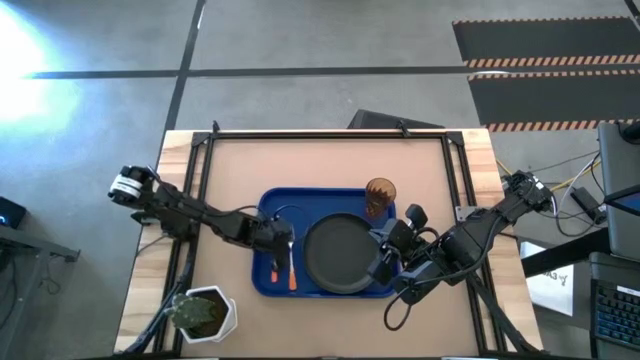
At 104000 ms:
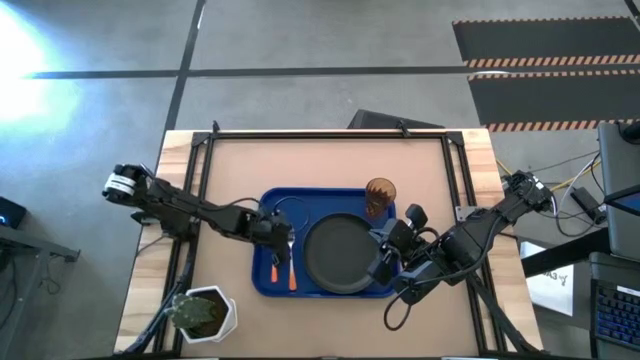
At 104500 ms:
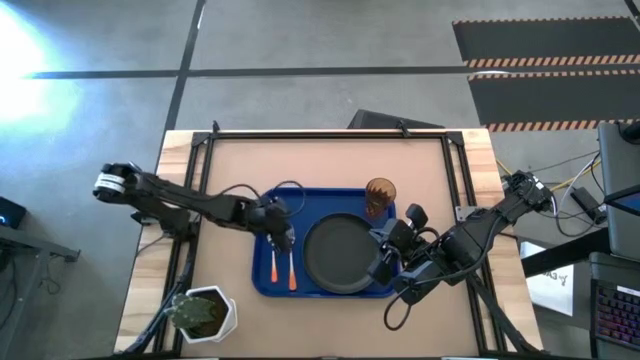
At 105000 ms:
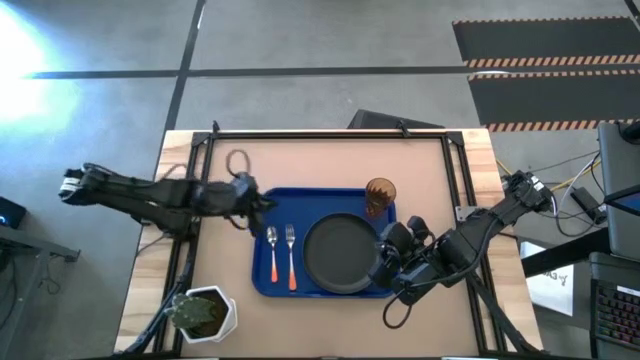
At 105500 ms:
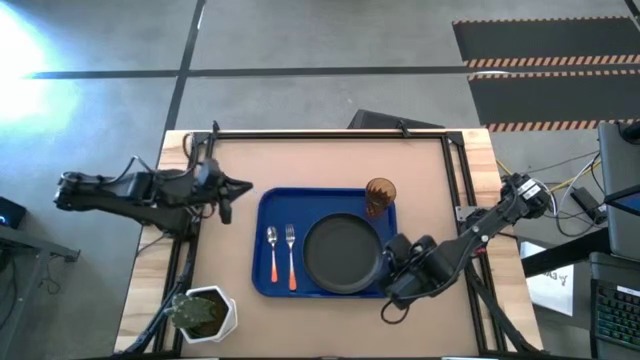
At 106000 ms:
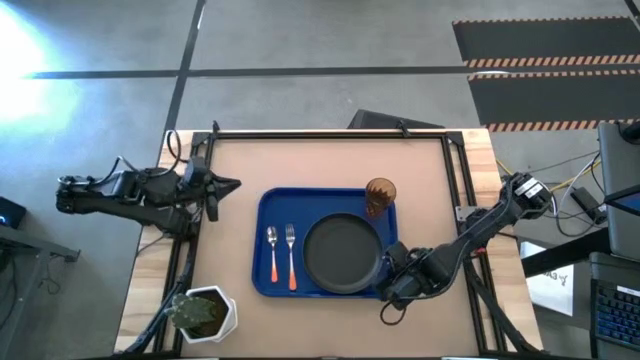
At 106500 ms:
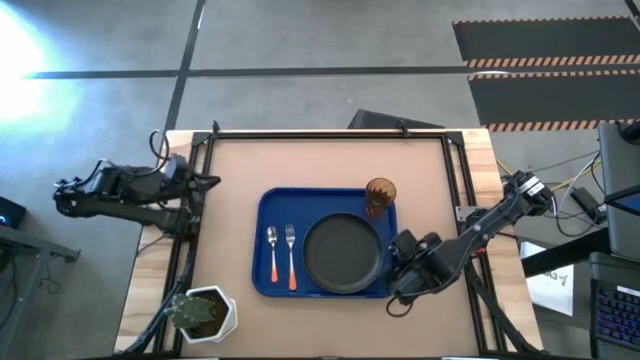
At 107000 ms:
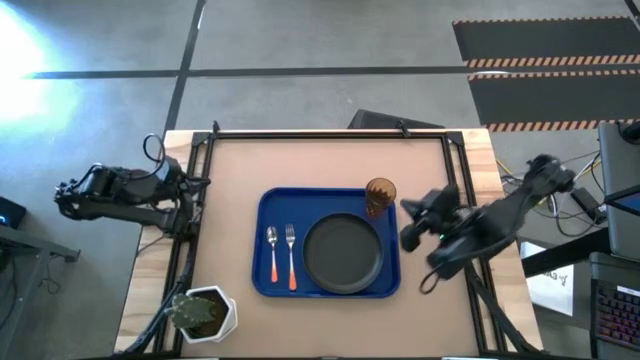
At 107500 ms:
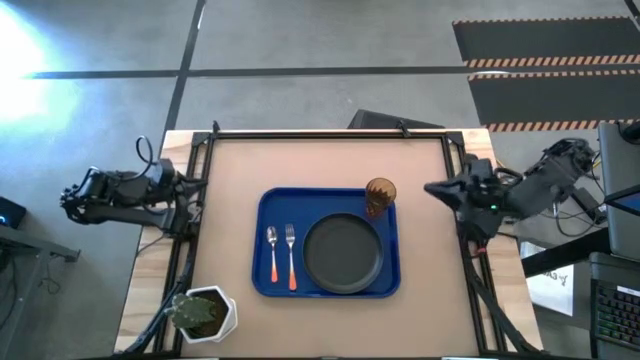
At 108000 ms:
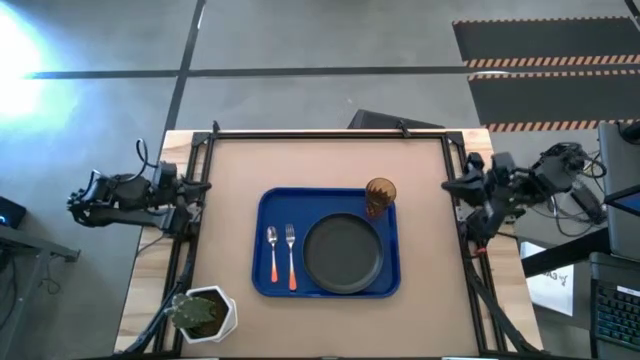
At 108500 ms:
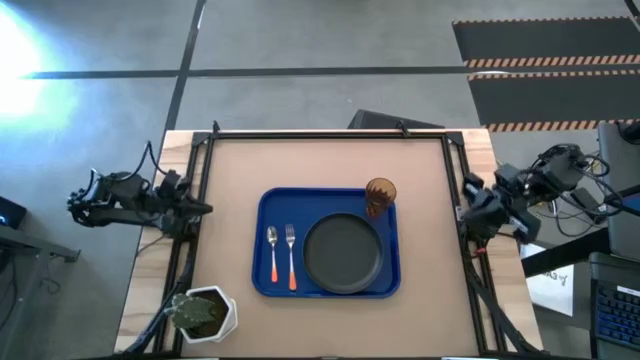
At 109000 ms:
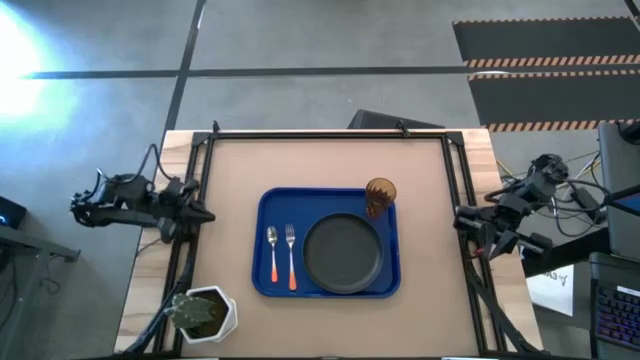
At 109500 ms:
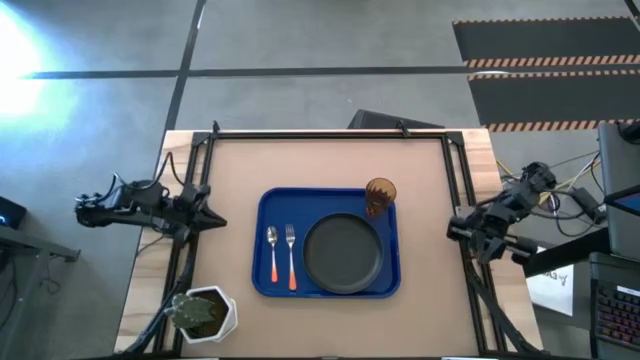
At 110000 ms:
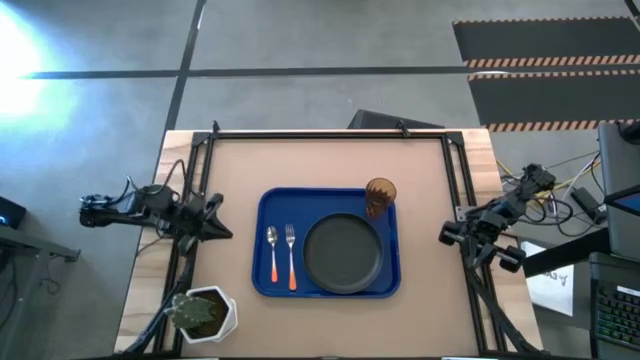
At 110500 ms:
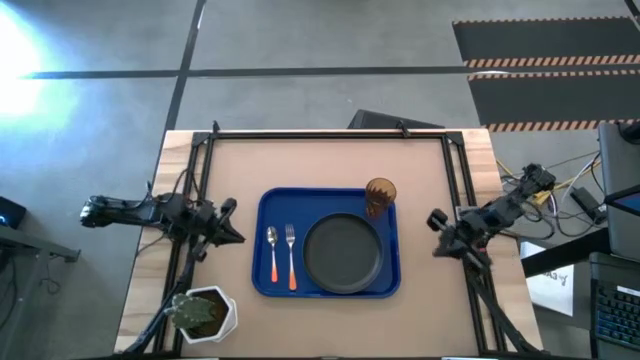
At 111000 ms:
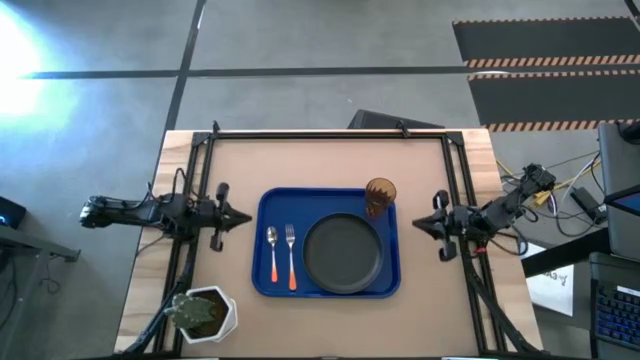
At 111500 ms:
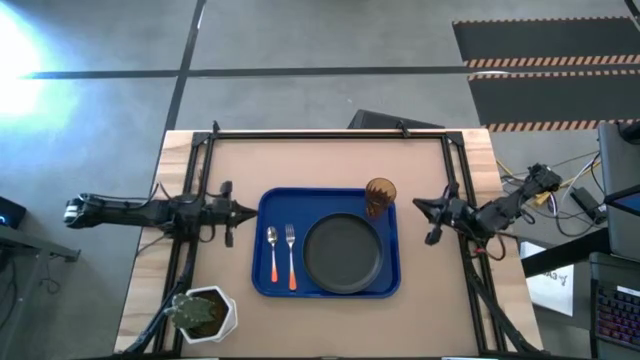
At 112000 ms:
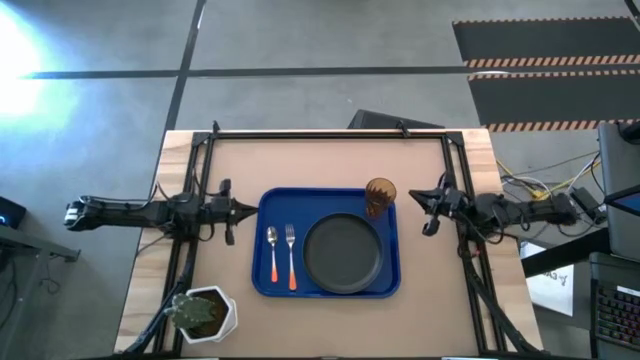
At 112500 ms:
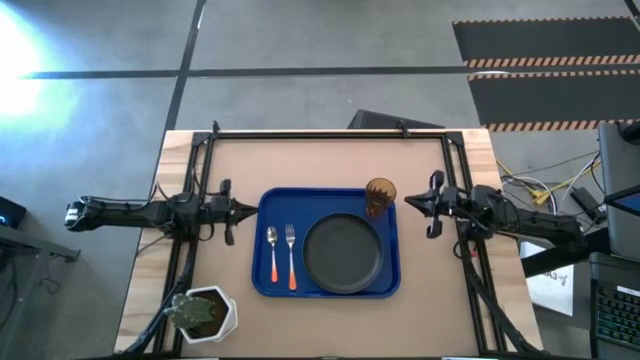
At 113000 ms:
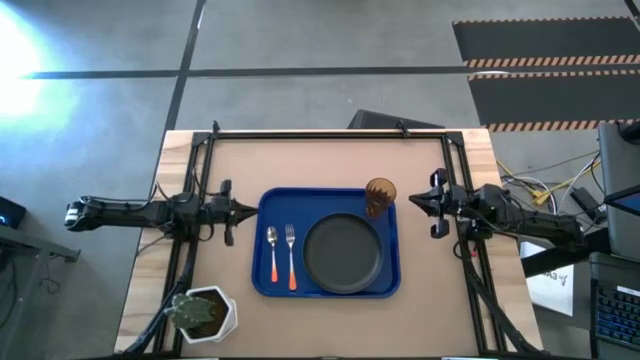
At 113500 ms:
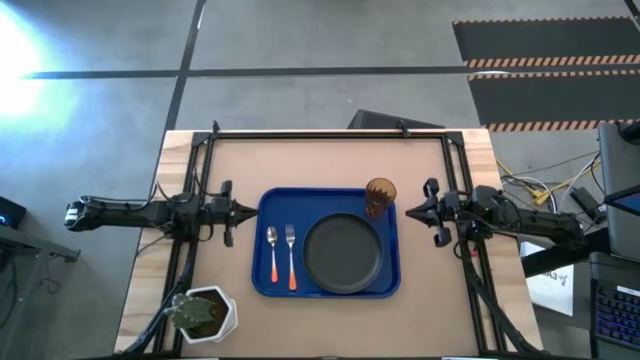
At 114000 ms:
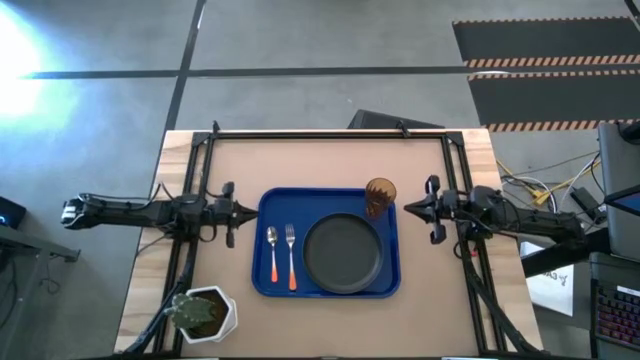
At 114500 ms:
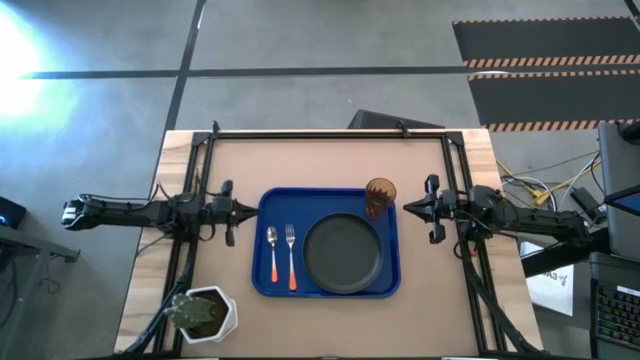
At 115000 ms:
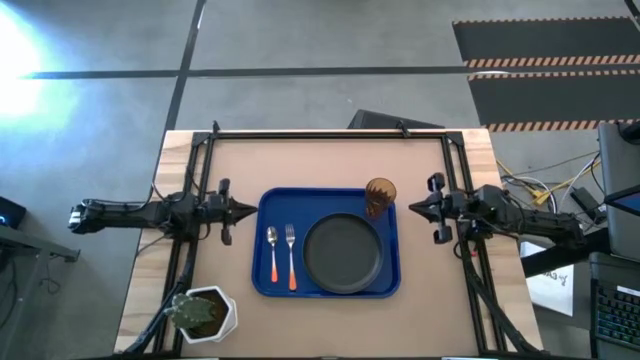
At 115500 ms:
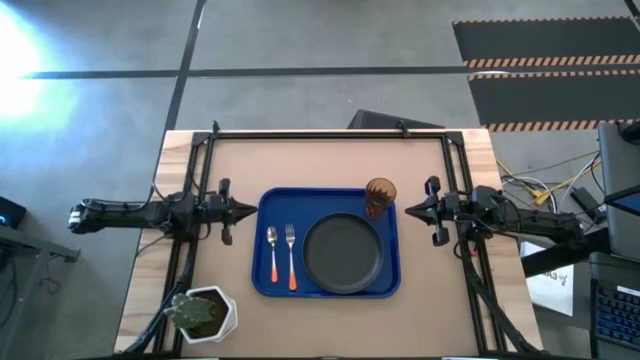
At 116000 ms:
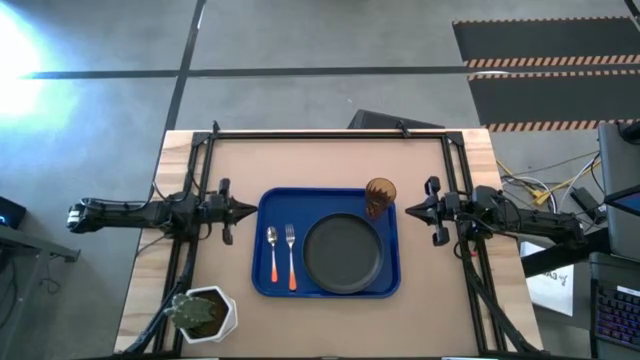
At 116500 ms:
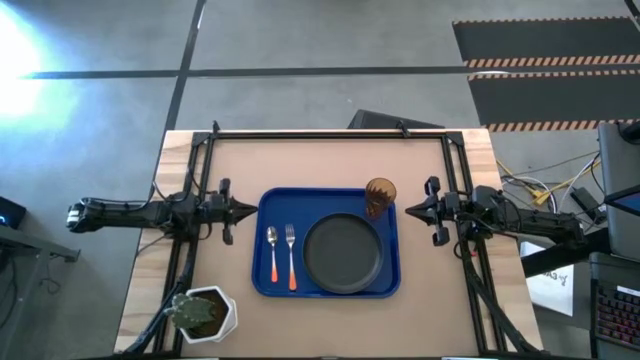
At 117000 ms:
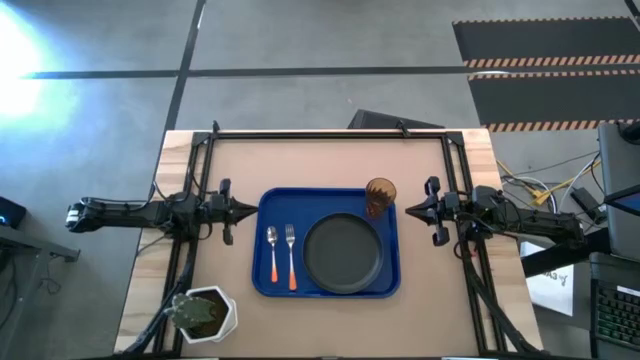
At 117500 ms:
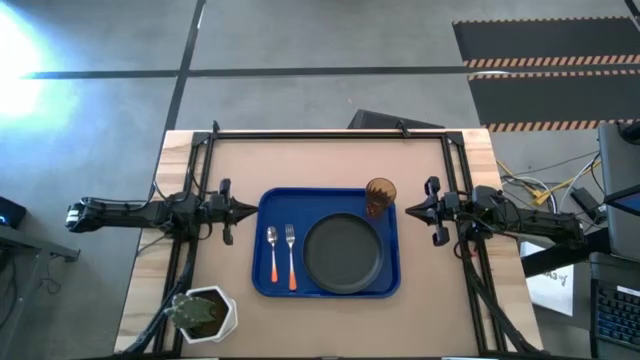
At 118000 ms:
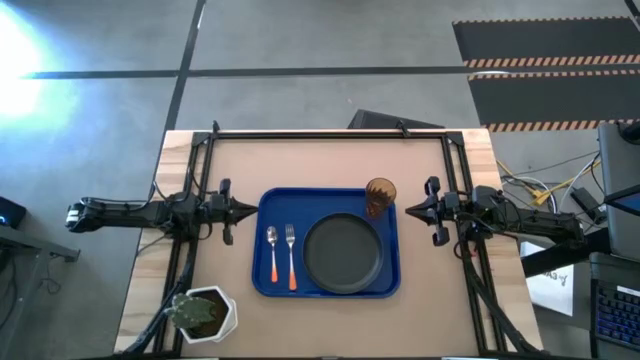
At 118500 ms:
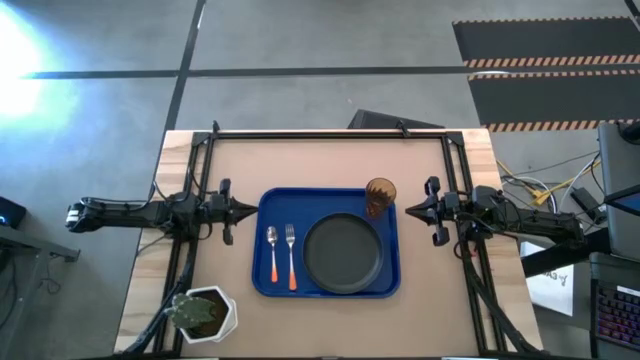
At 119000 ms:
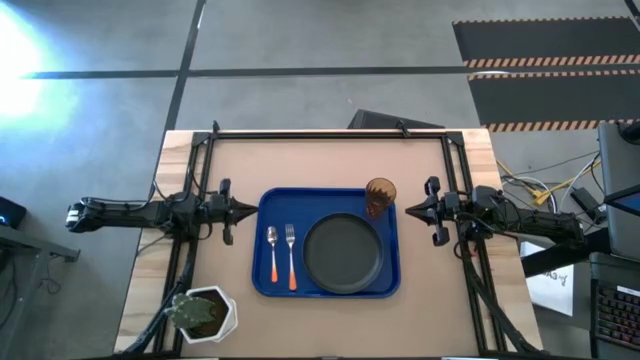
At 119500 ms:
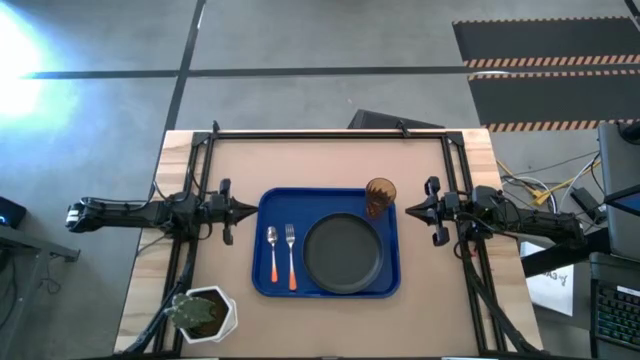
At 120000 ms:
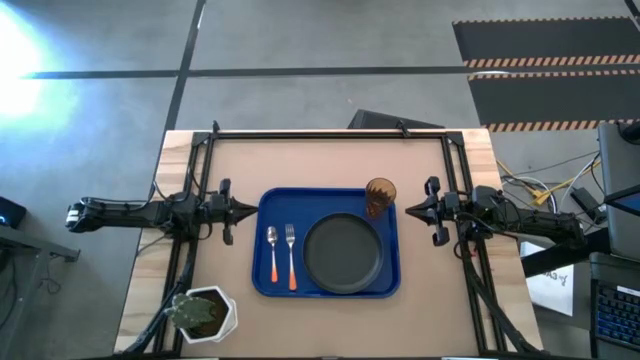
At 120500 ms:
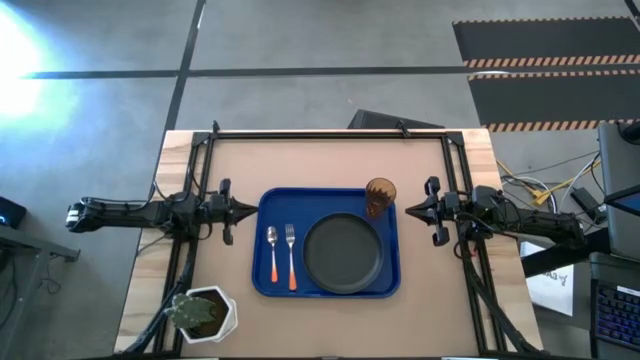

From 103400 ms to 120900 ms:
Task: Pick and place plate/cup/fork/spoon on tray
Return to Home Position

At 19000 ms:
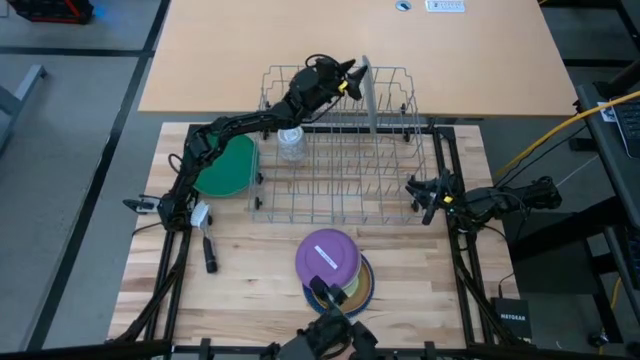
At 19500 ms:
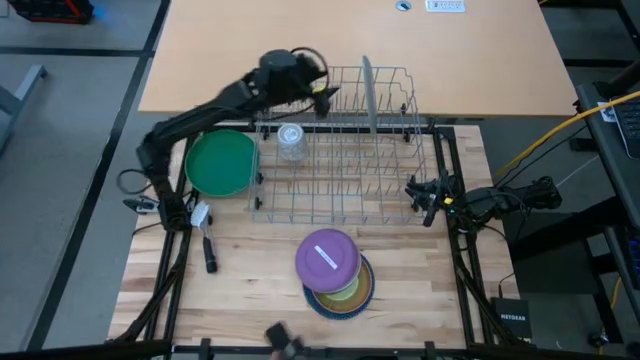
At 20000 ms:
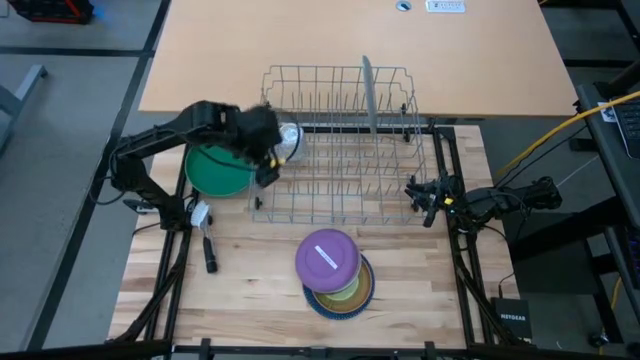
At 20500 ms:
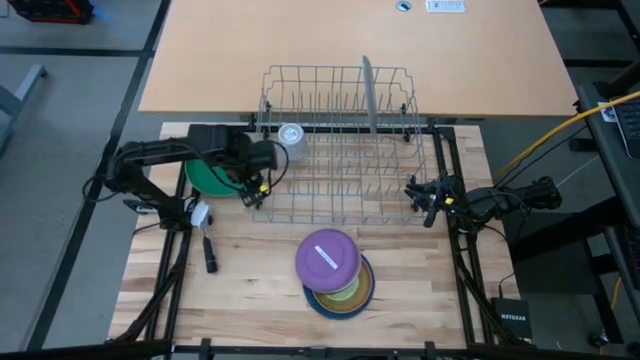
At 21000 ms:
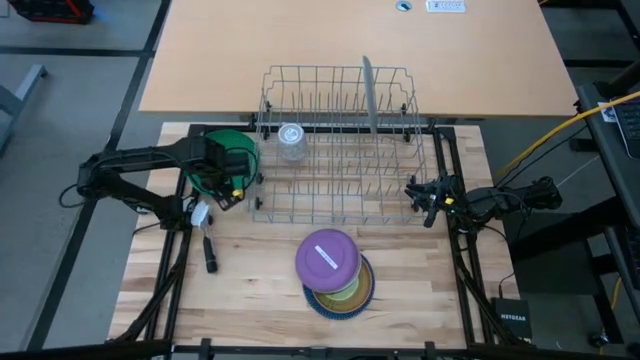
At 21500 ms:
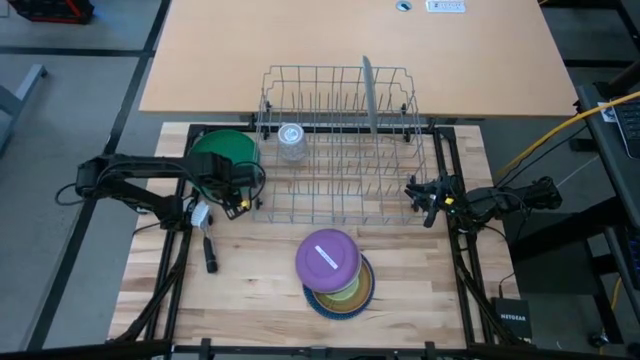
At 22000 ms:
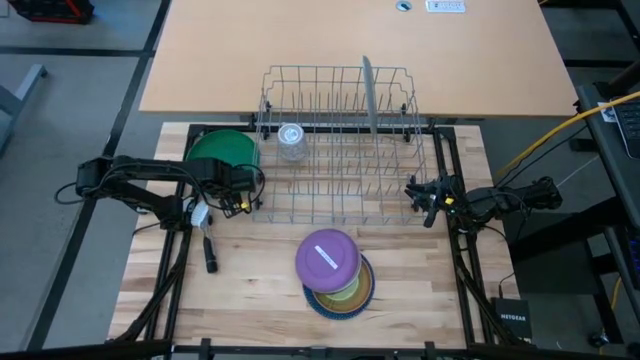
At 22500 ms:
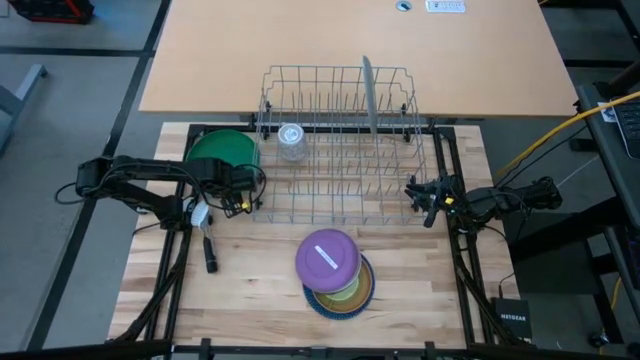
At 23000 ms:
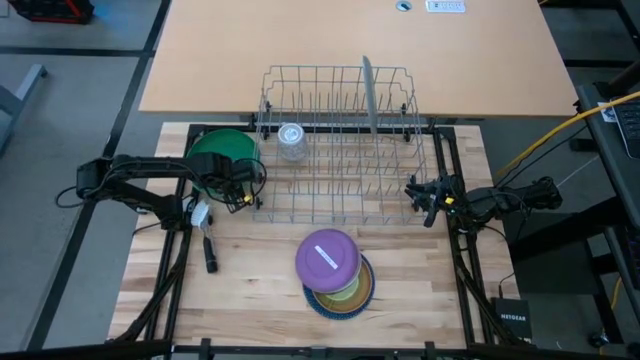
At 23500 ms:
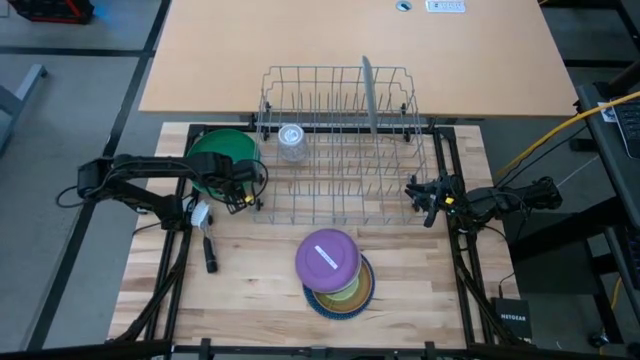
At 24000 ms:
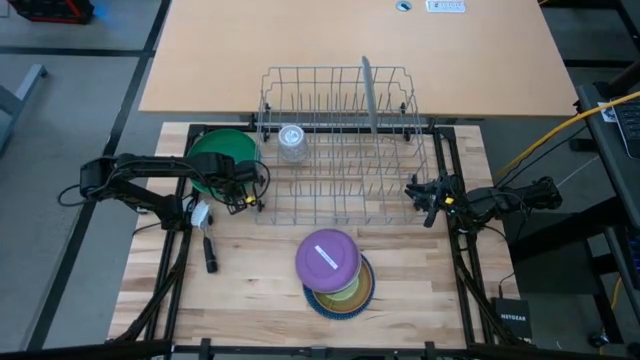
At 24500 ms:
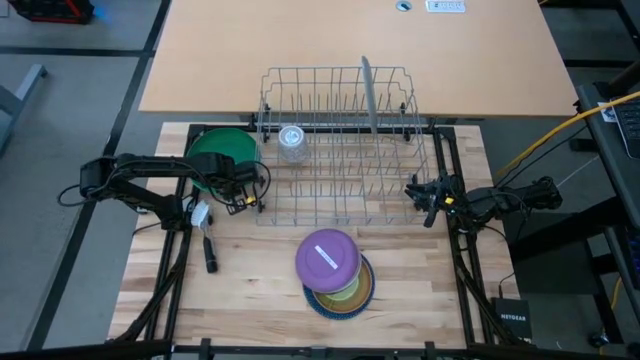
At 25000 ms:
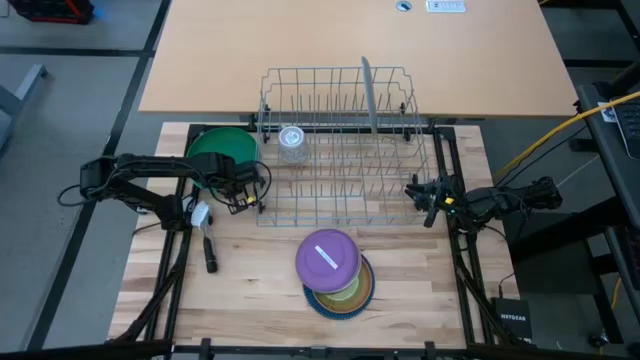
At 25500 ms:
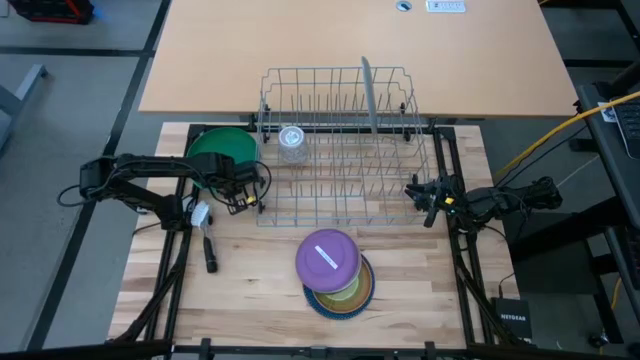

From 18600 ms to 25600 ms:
Task: Sort dishes
Put the top dark green plate in the dish rack
